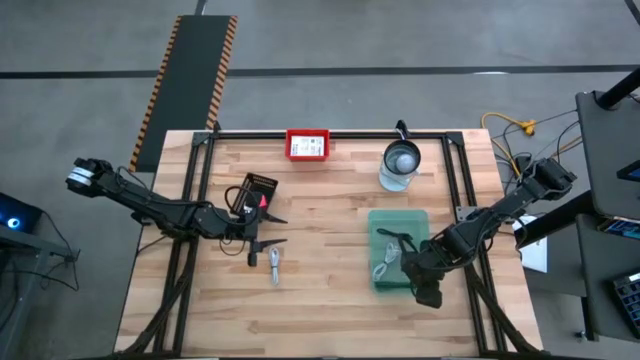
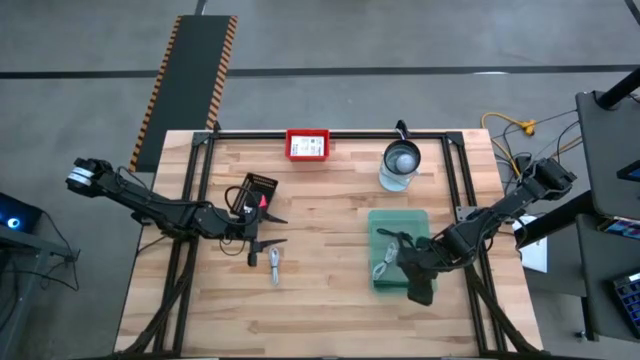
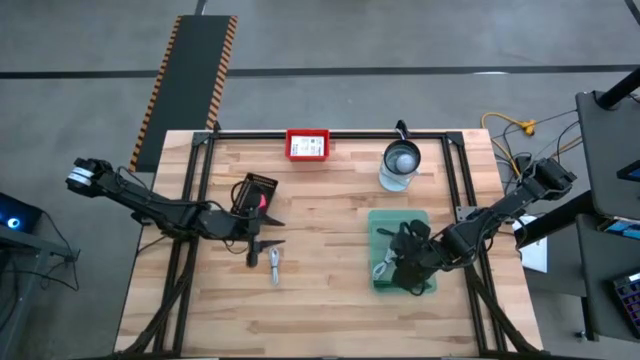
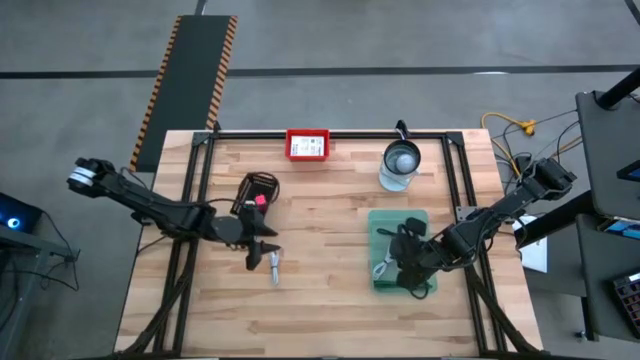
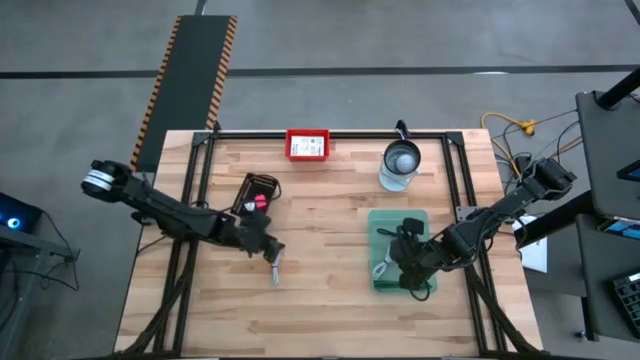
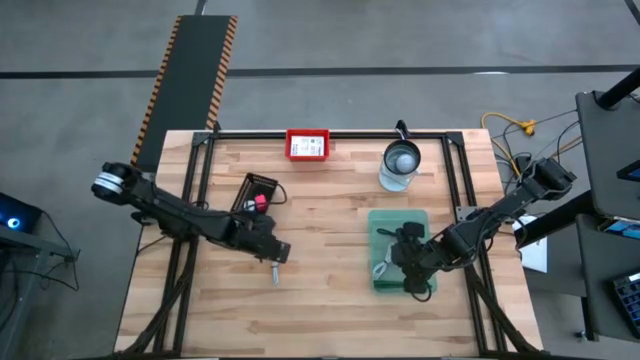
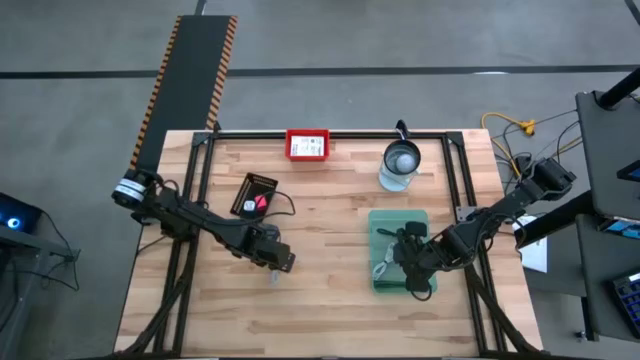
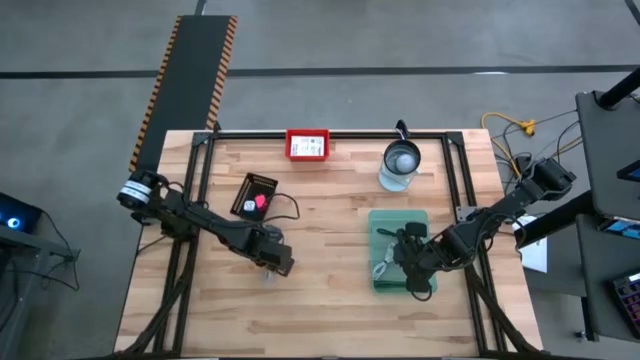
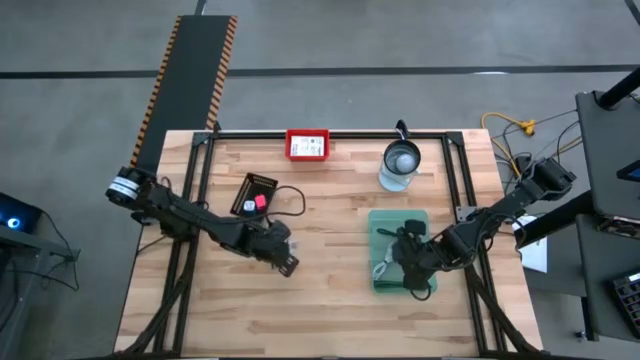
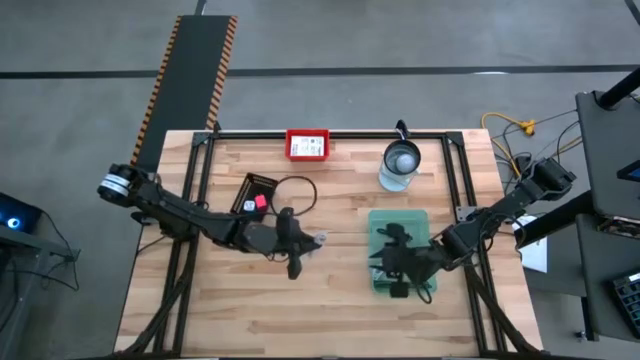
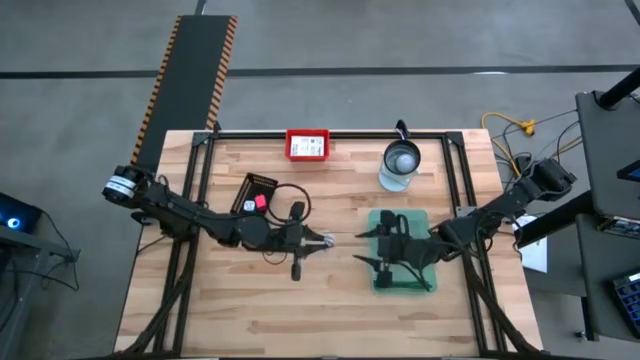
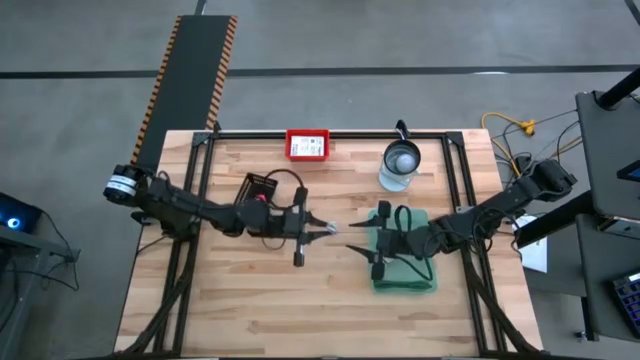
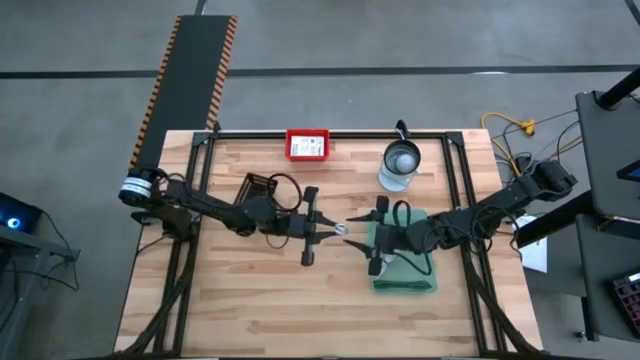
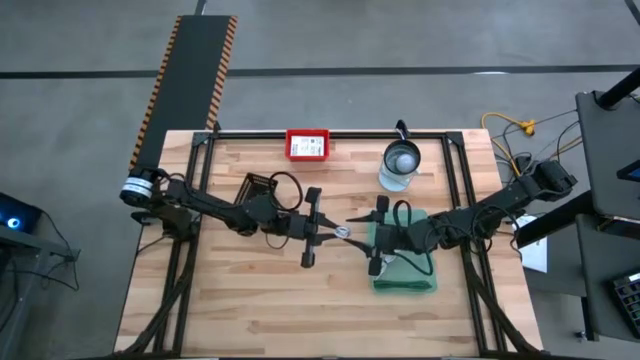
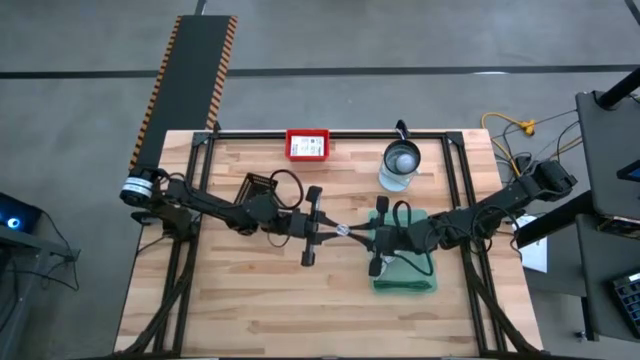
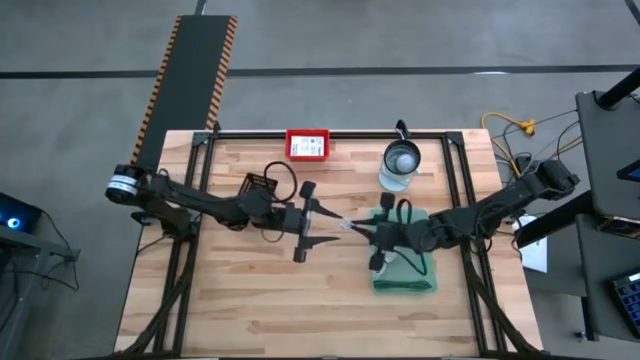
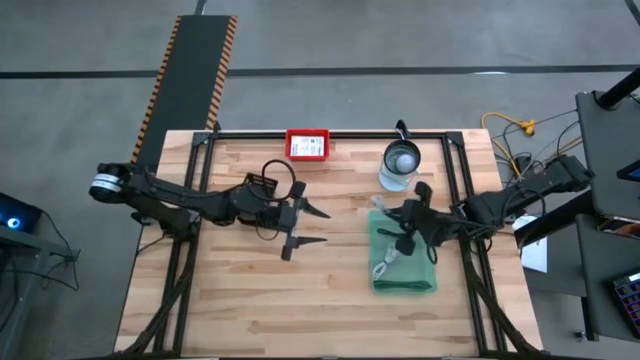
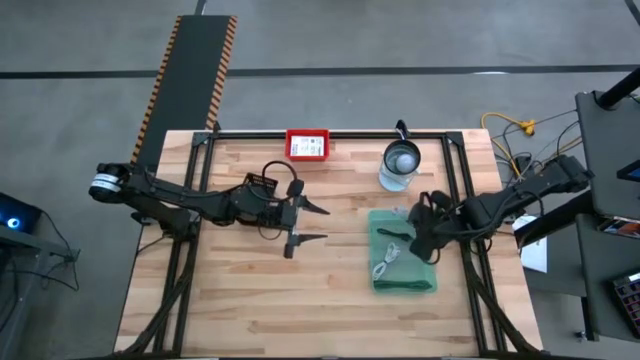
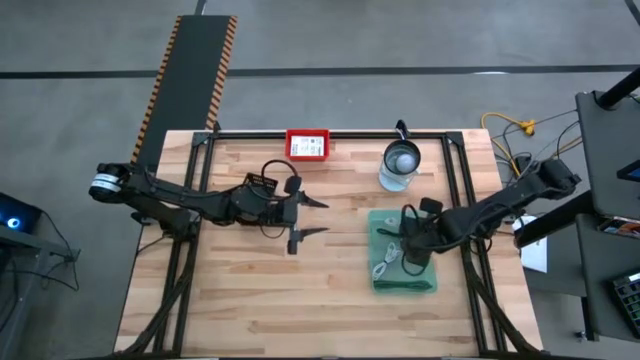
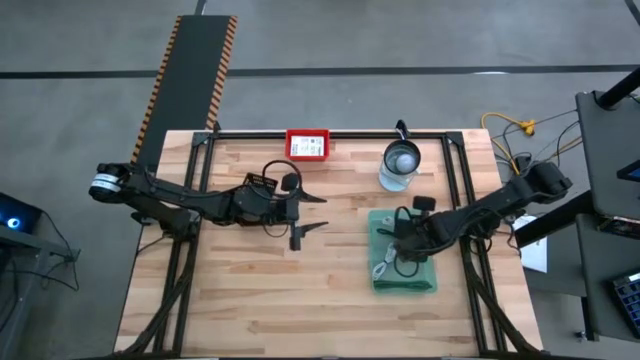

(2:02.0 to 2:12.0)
Task: Pick and place items into bin
Put the white charger cable into the green bin

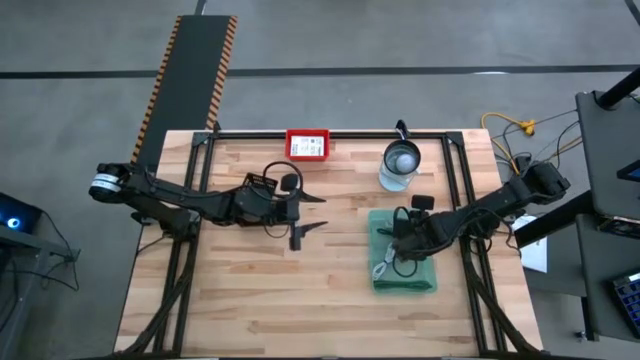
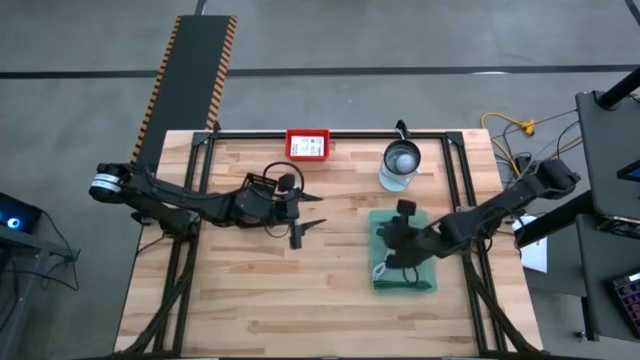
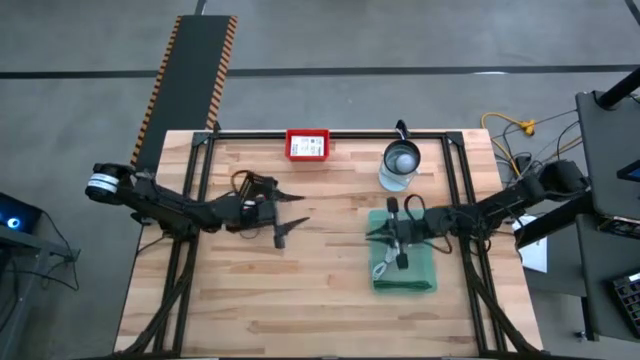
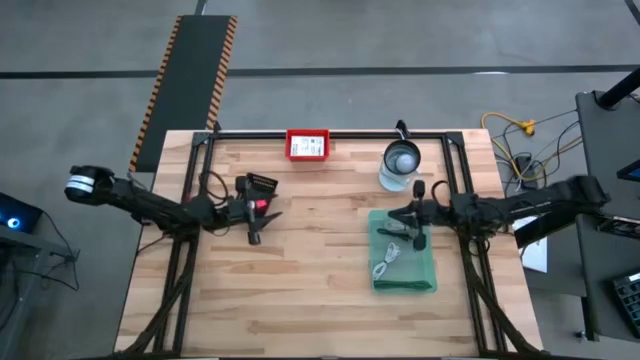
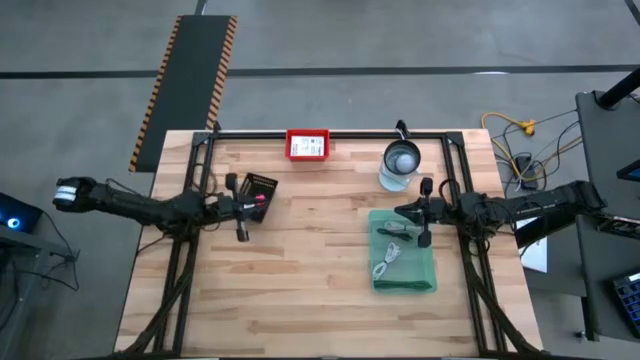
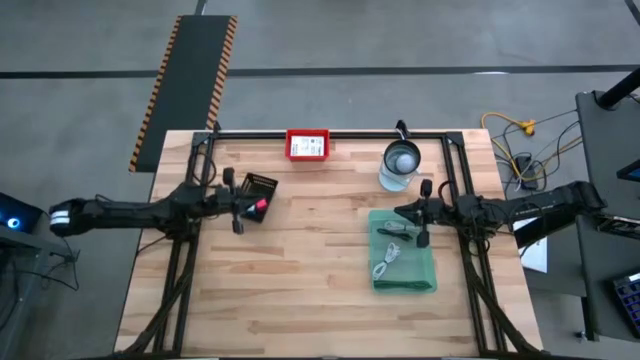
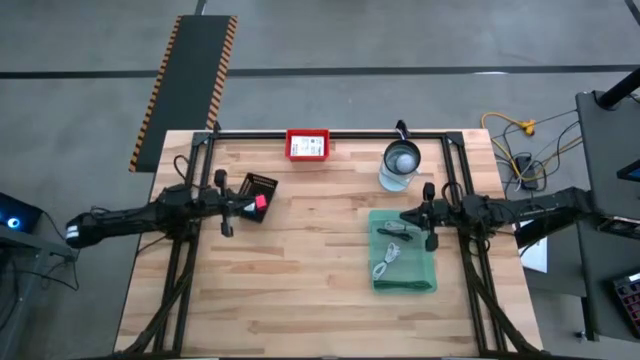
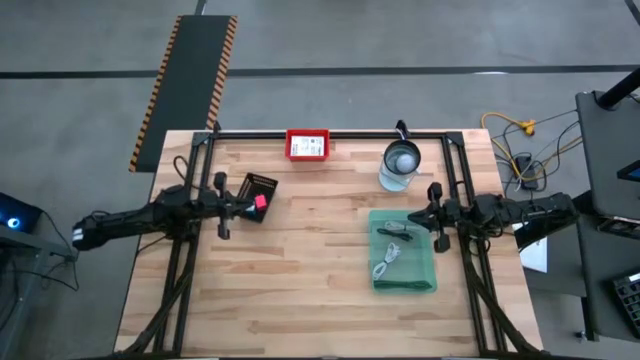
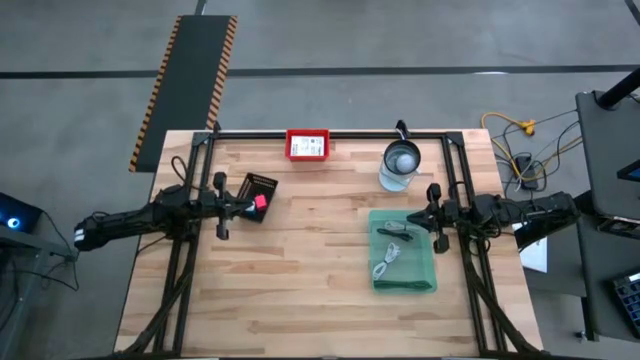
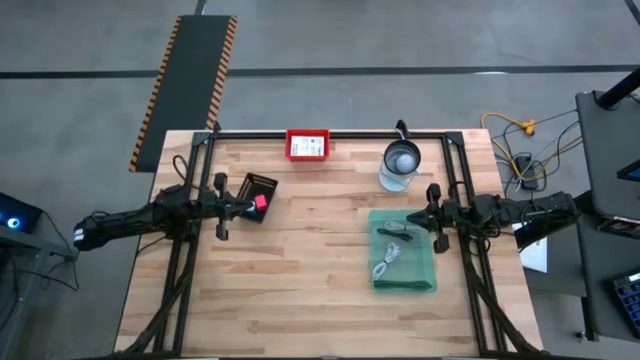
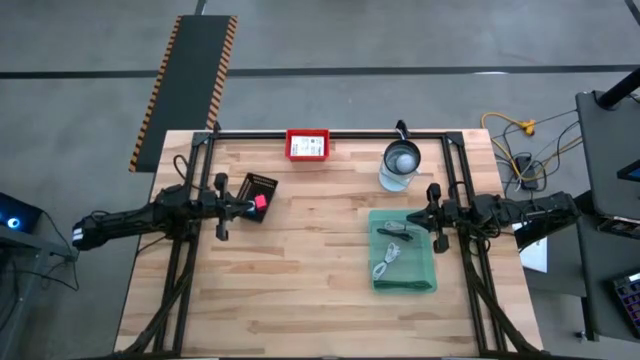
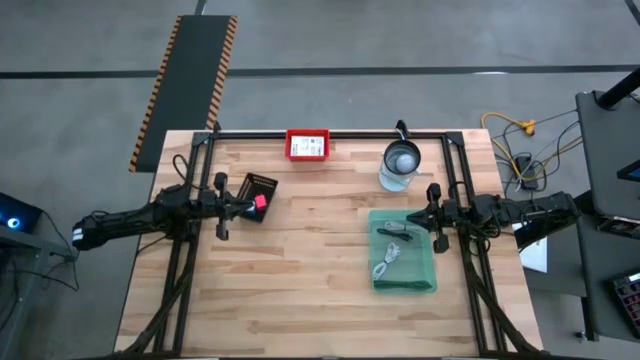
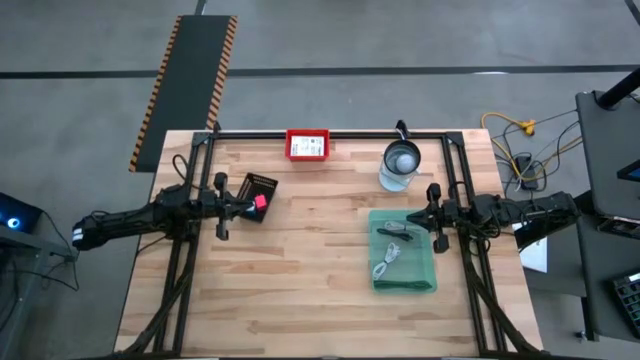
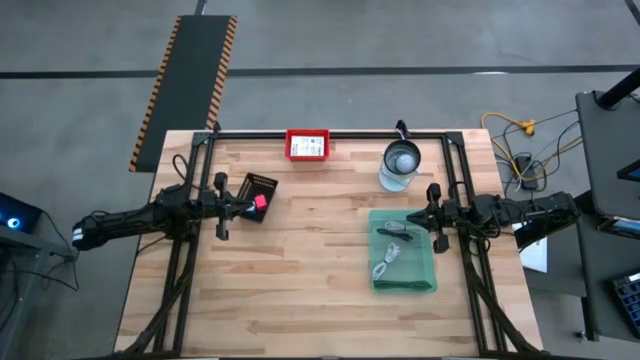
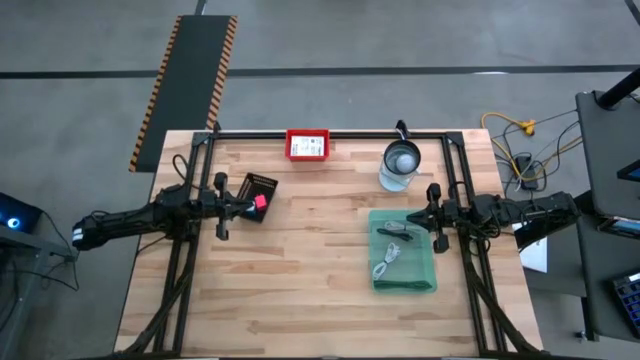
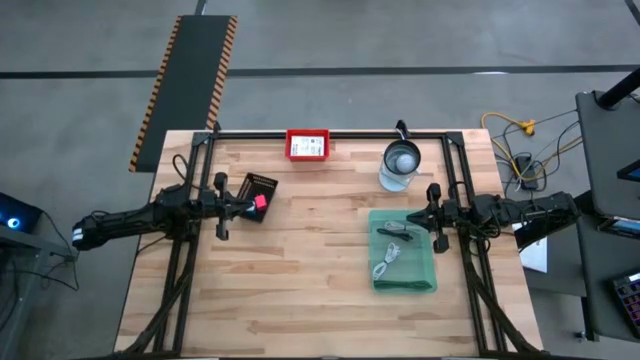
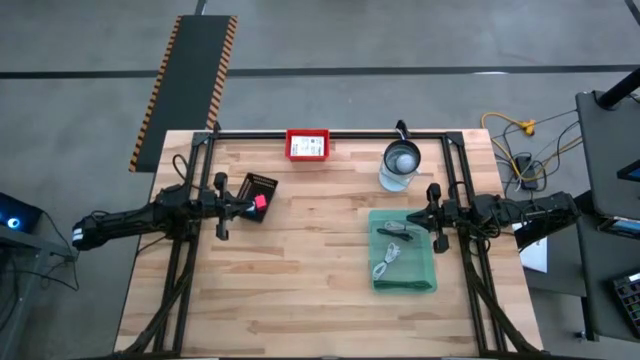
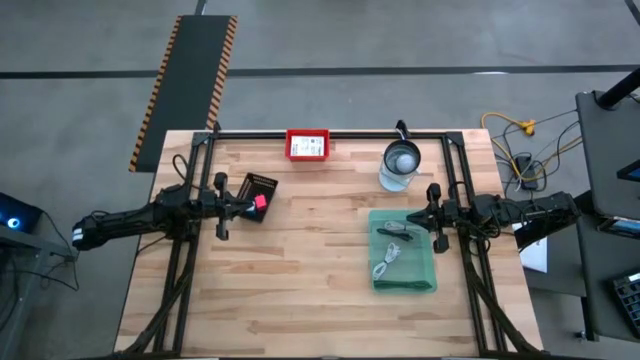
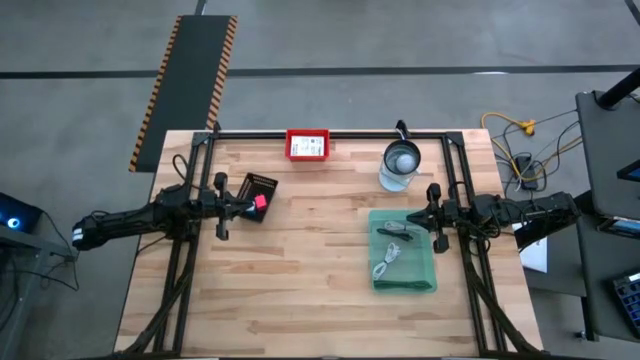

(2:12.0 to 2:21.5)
Return to Home Position

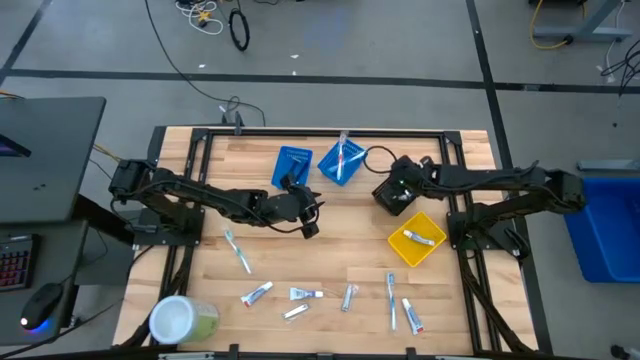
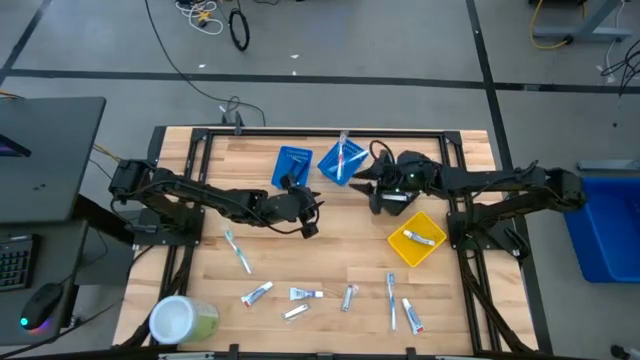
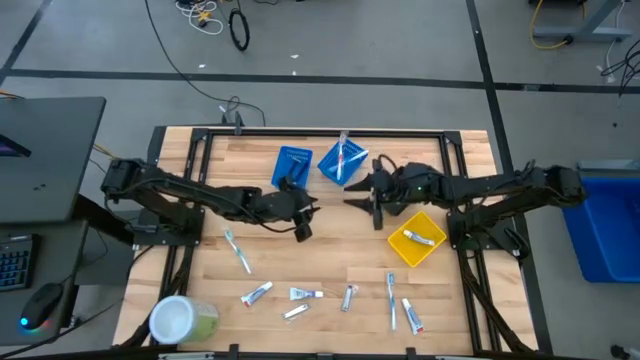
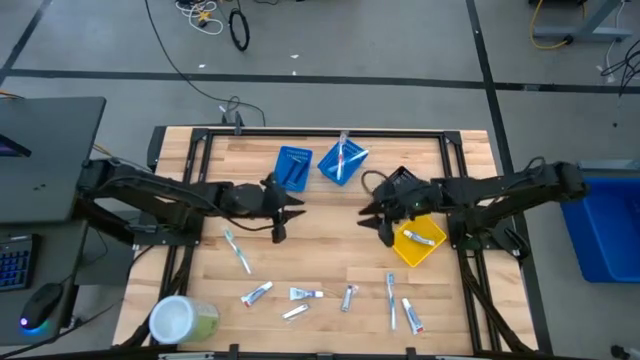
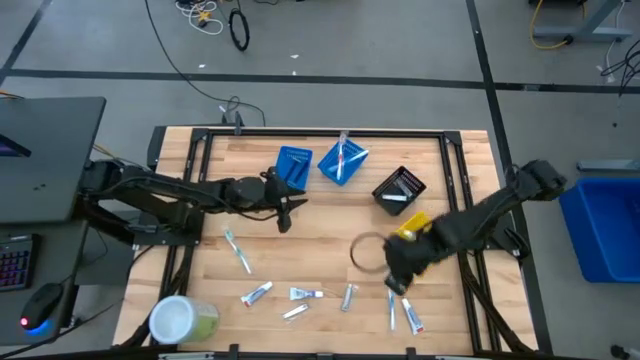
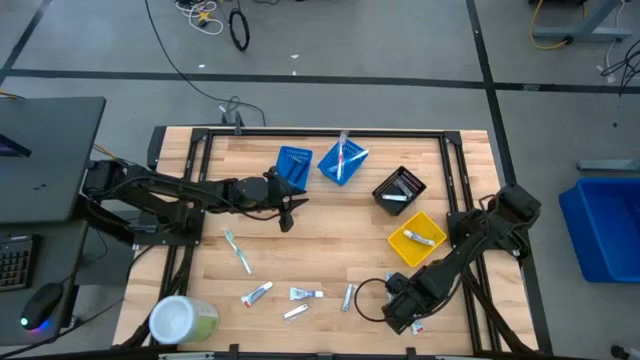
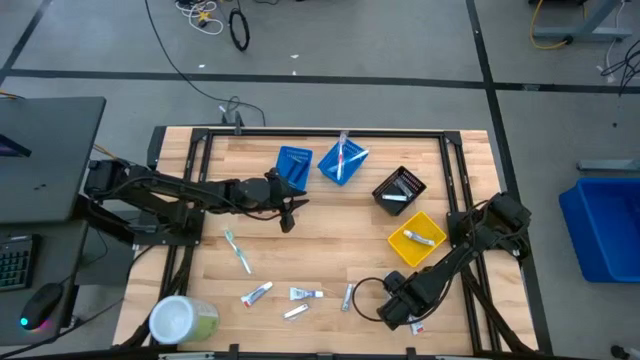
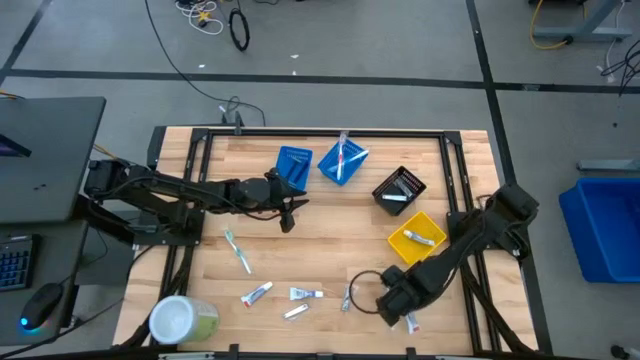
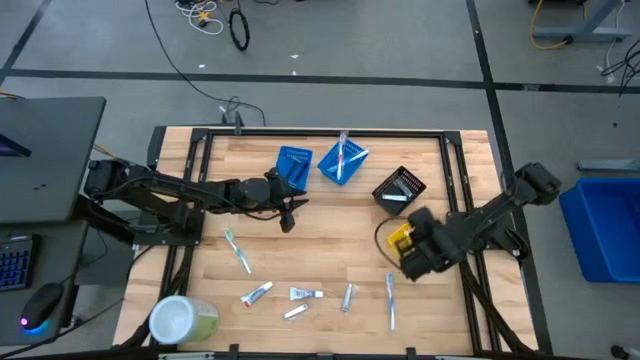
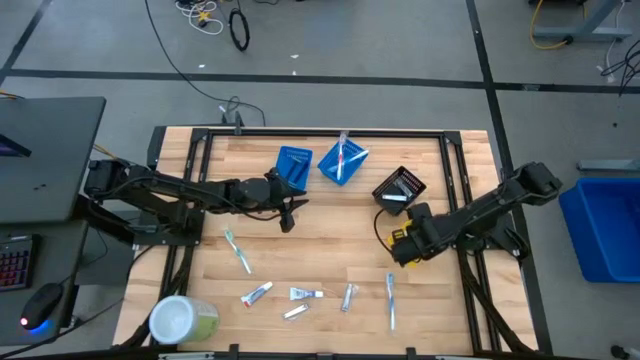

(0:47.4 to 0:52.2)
Task: Pick & Place Travel size toiletries
Put the white toothpaste into the yellow basket
